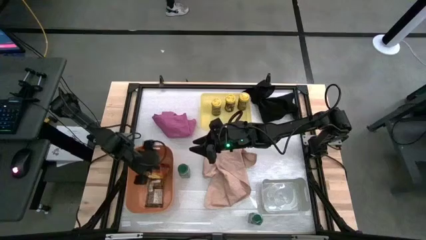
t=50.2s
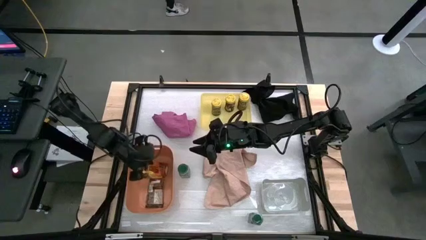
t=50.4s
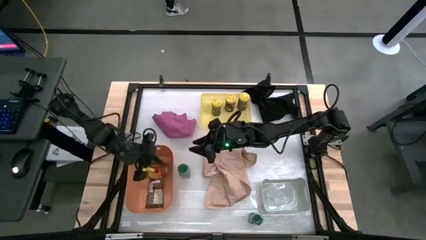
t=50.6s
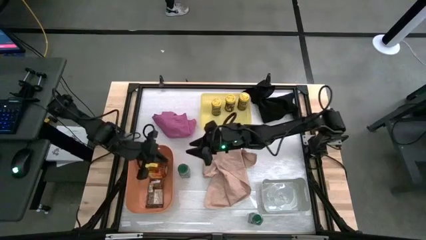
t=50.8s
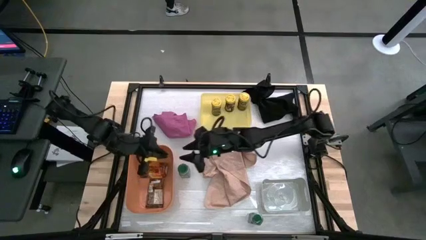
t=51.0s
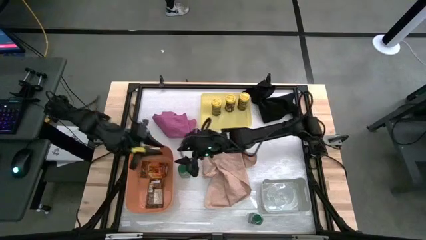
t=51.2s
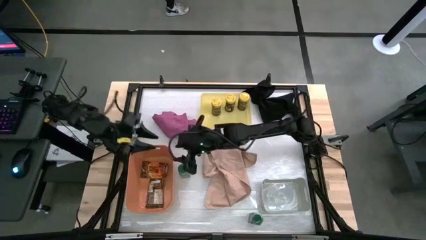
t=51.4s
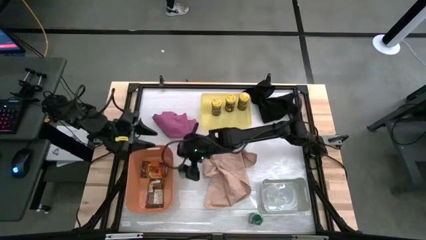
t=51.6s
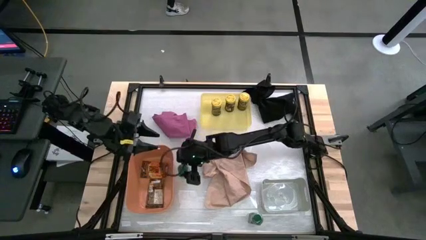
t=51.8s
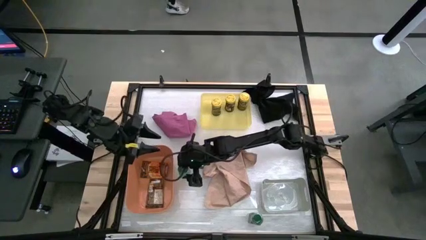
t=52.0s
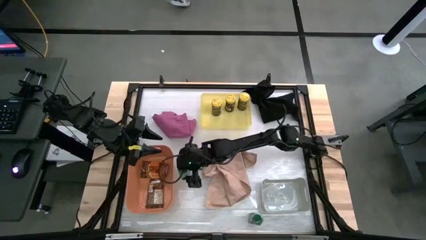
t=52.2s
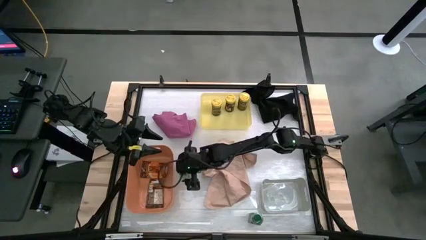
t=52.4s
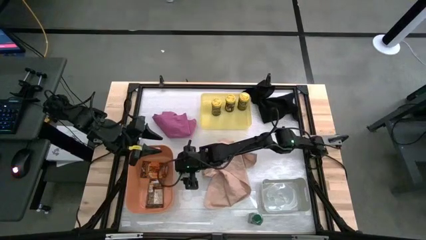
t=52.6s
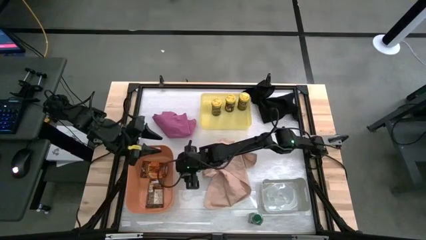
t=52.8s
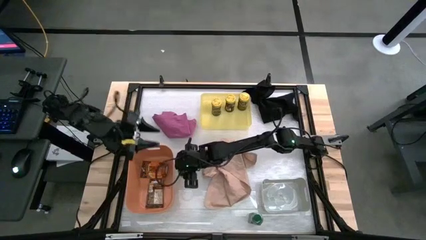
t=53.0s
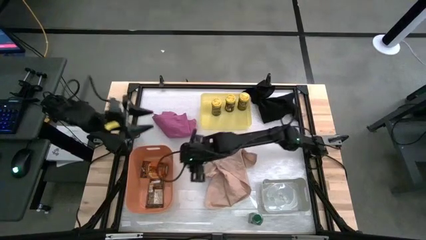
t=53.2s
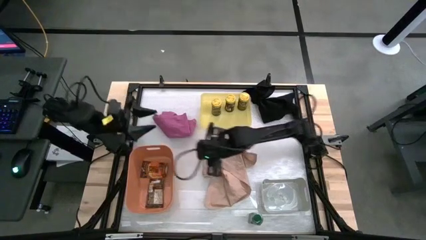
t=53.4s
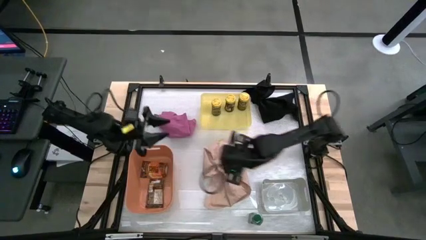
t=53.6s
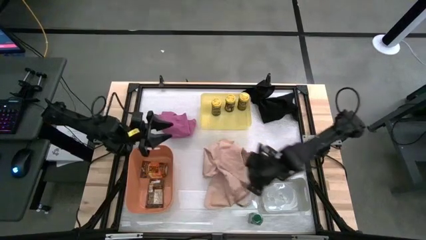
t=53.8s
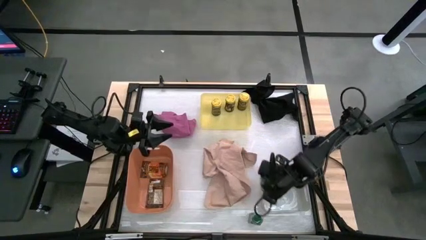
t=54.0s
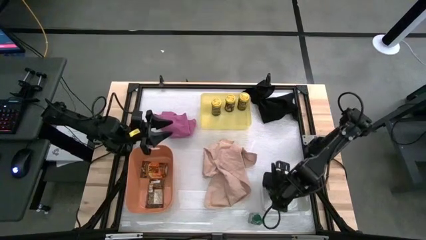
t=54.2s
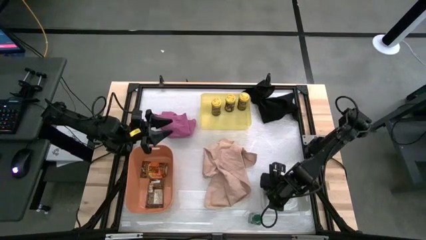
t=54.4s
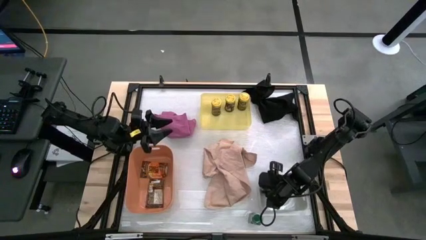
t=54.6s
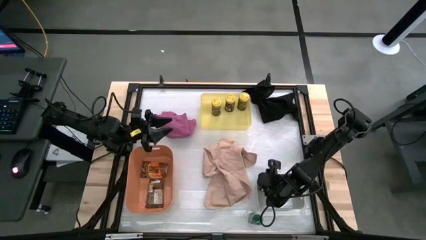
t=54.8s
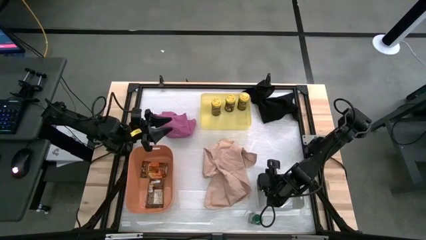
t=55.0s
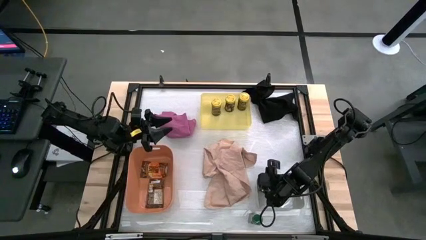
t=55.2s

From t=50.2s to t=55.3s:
Task: Sort spices by type
Put the top green spice bottle into the gray bin

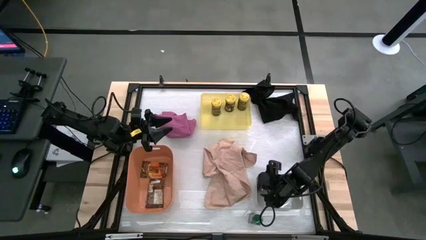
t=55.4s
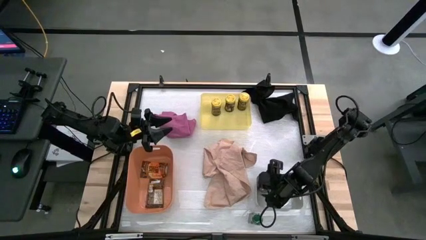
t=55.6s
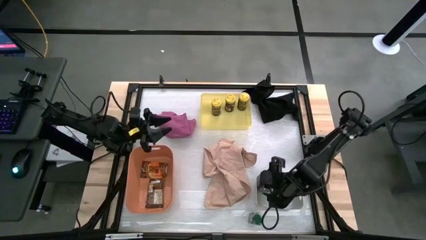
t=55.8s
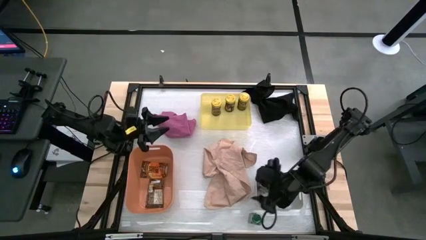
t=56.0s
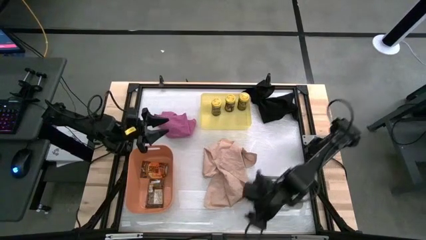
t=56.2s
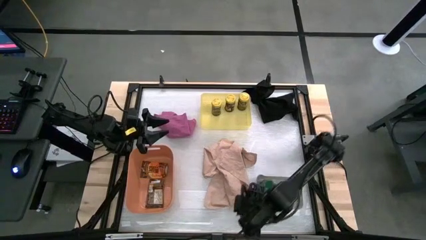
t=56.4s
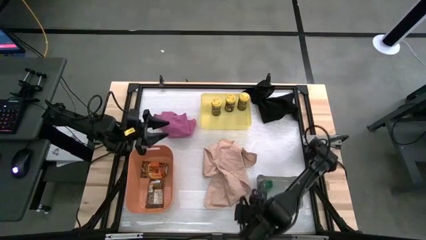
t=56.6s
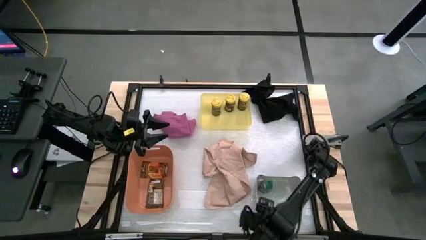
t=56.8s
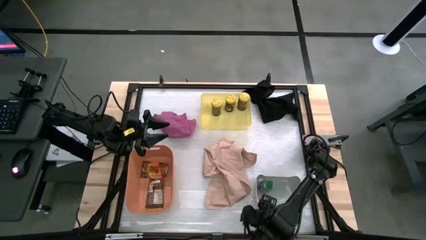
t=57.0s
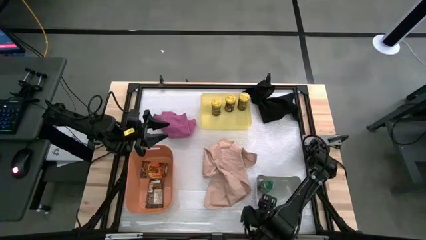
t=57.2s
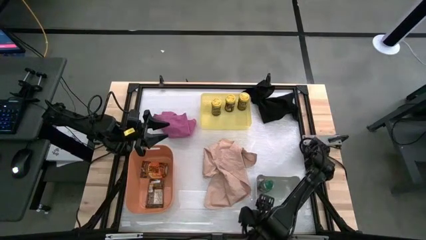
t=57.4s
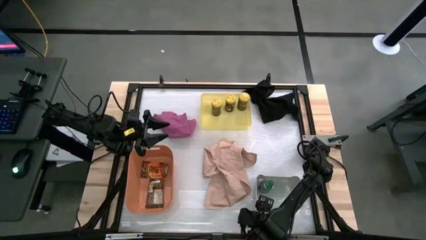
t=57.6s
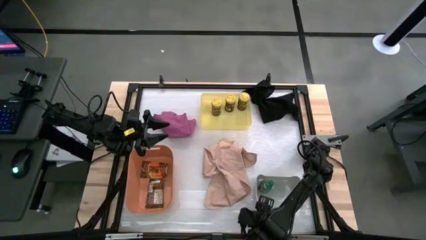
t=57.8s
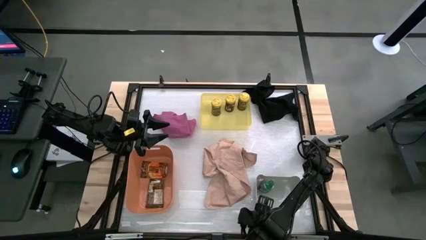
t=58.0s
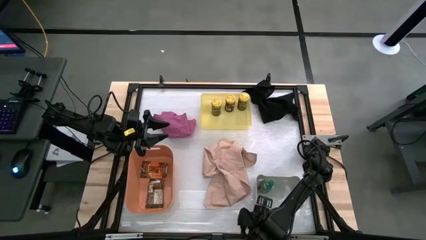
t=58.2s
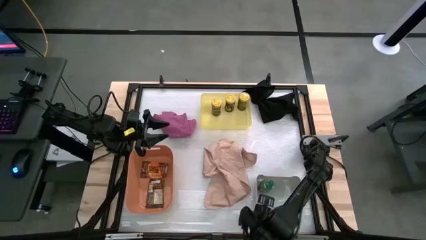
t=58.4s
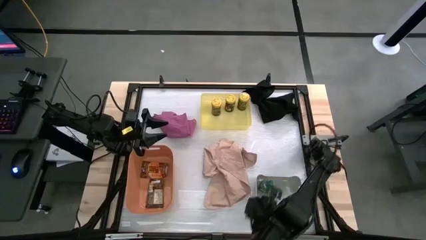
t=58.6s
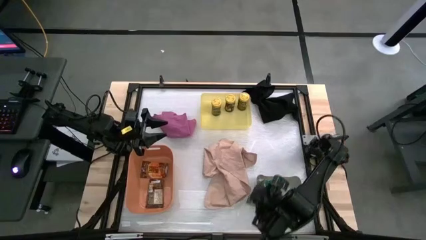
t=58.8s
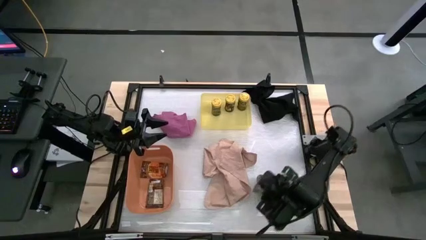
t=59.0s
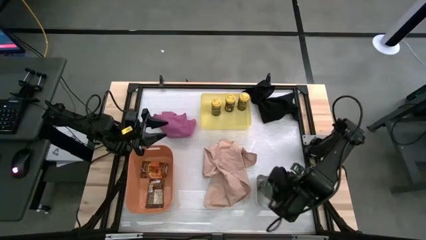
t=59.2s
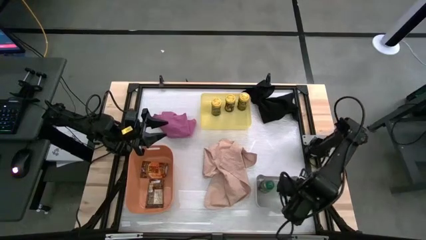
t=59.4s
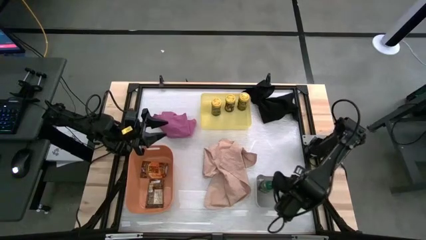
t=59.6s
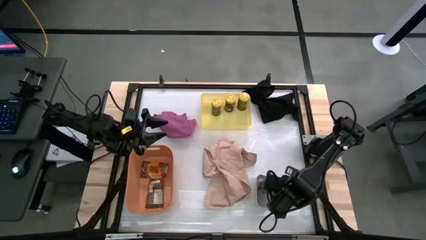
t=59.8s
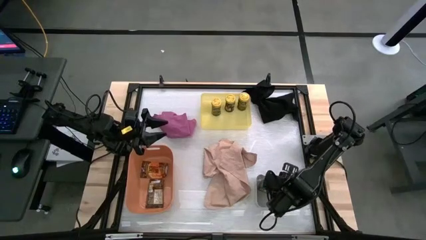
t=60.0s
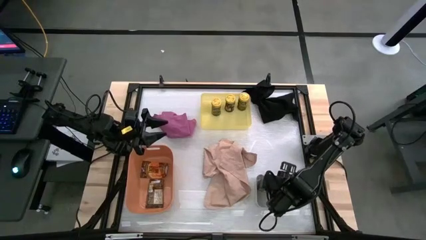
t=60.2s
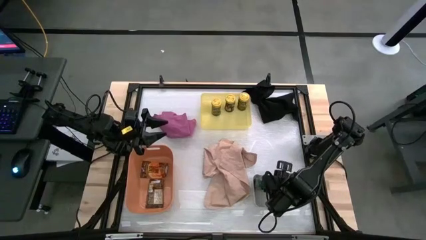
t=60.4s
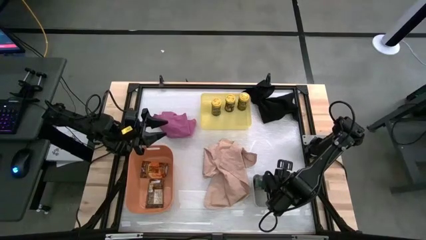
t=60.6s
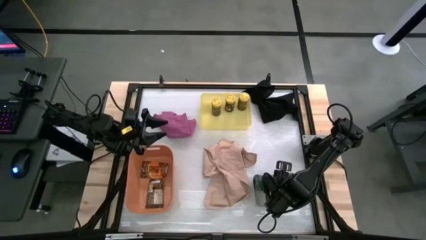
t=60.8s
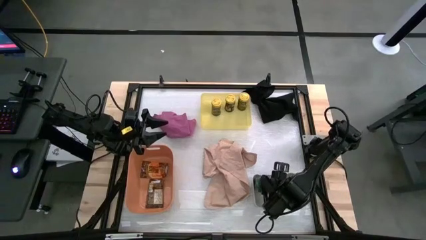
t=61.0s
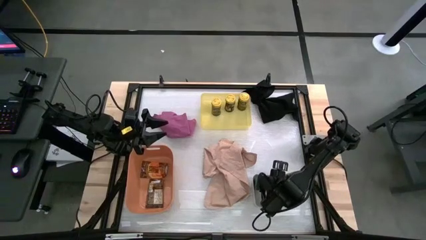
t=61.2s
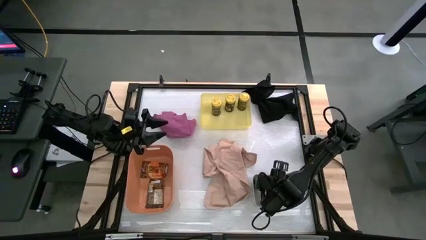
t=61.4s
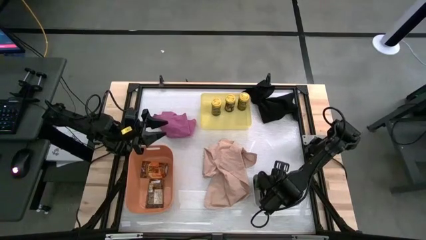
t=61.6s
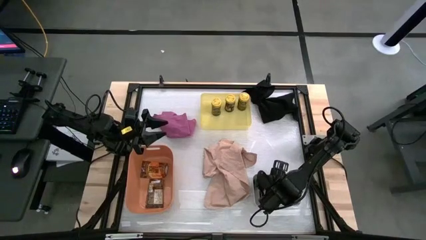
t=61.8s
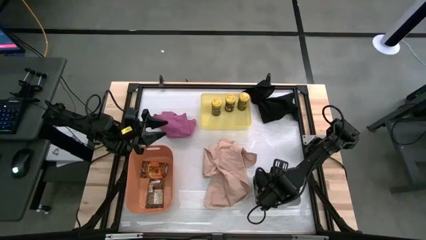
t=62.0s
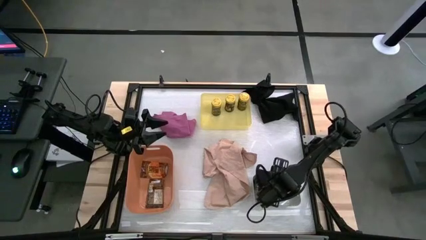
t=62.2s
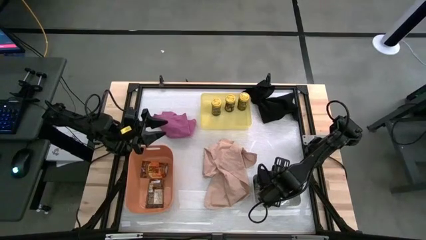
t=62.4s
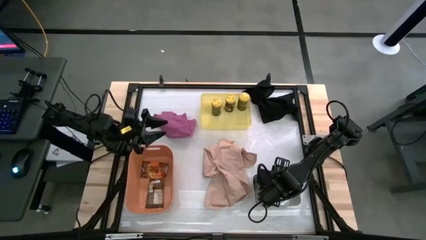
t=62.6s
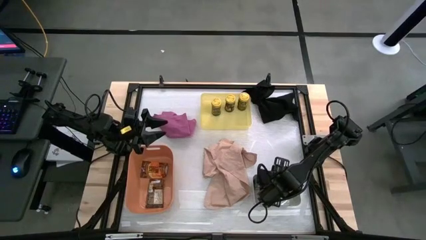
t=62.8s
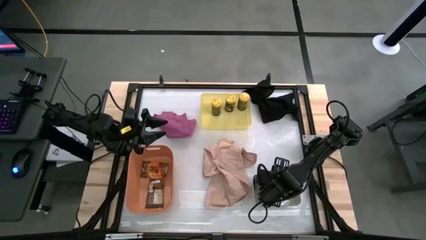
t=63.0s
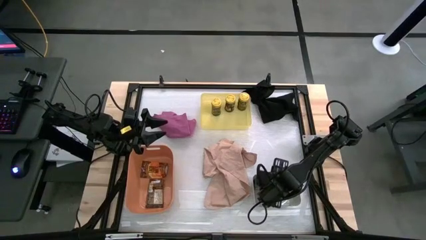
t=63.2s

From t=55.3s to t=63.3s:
Put the green spice bottle into the gray bin

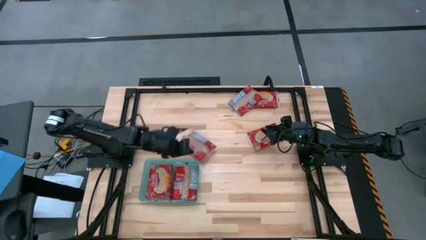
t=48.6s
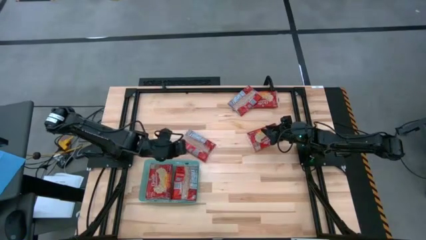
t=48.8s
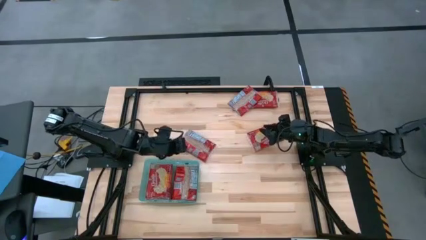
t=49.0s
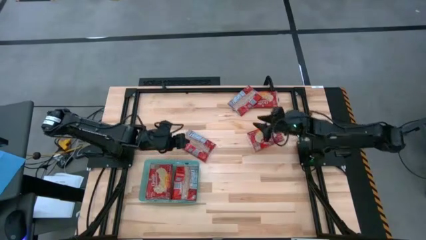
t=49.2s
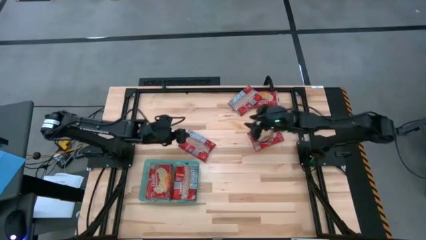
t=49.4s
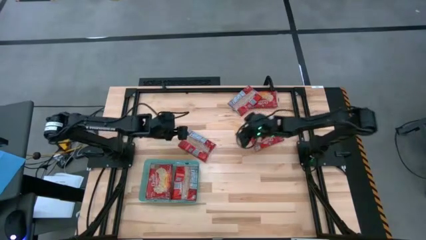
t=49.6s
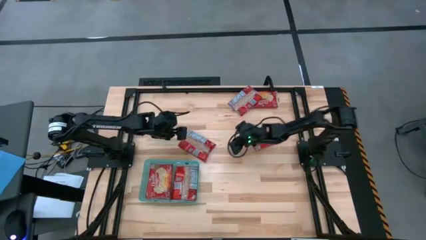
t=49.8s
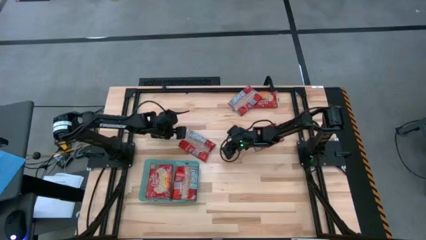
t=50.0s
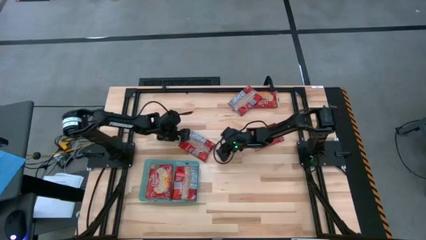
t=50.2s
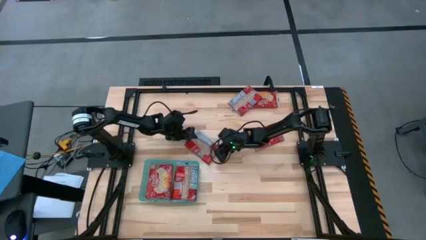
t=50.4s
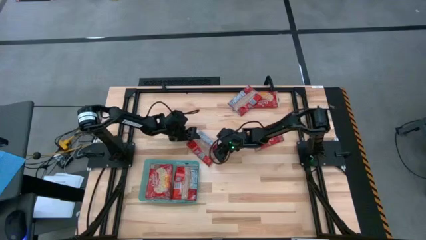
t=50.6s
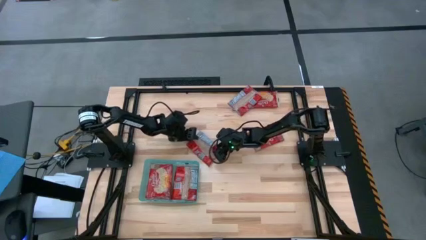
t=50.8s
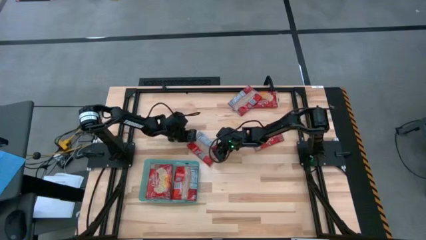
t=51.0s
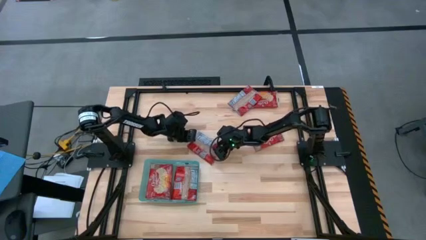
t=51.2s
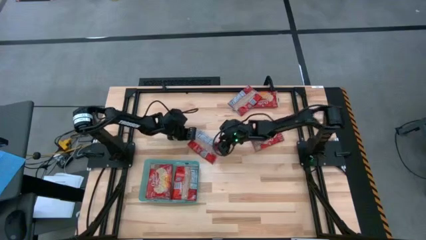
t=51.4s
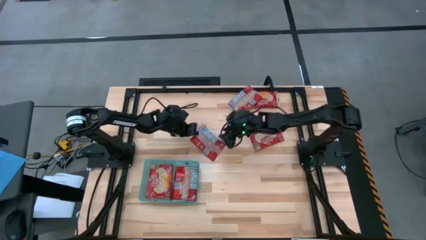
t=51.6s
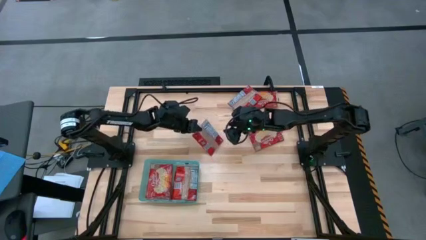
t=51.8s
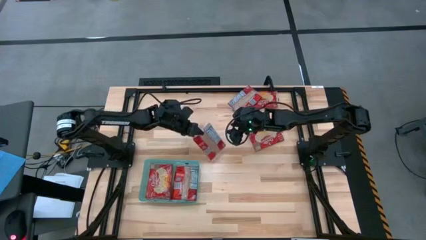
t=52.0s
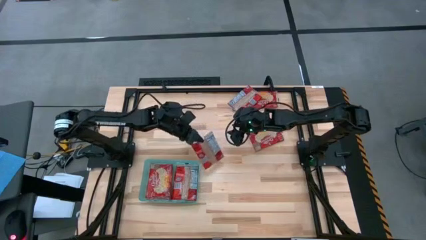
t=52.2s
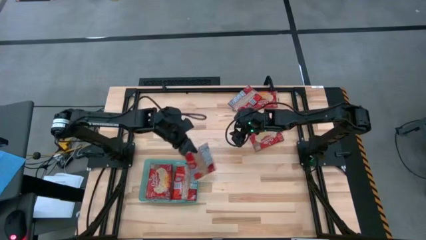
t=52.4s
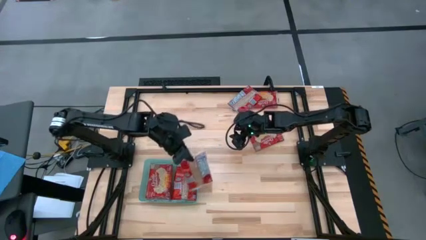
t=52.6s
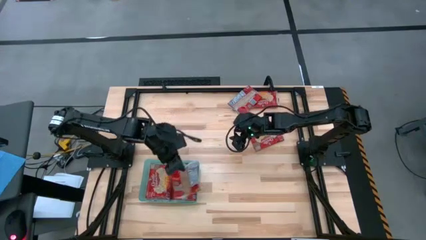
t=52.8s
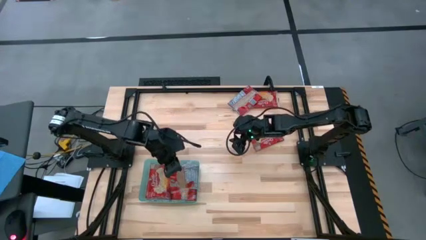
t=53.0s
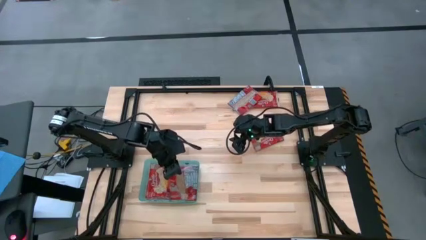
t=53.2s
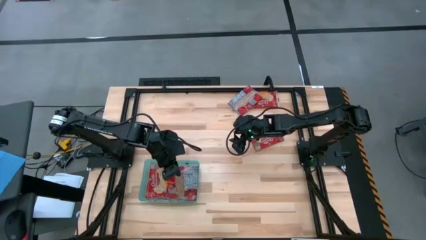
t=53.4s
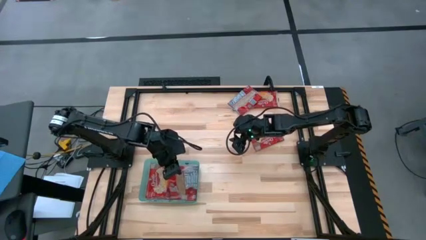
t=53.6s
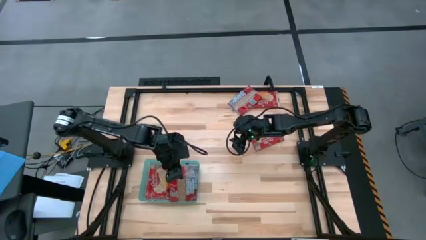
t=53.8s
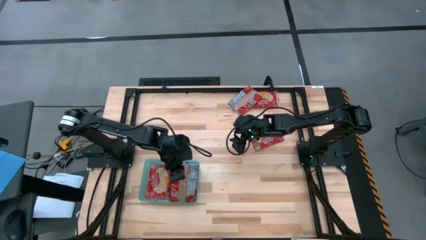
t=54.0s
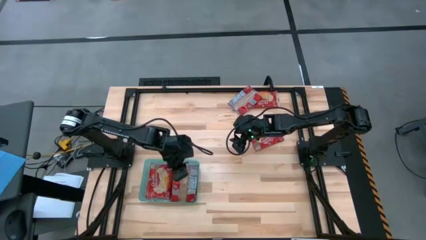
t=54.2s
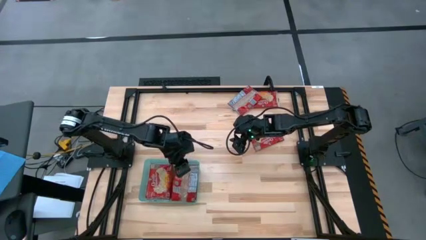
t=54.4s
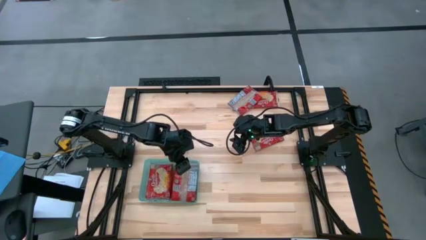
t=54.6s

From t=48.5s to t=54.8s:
Task: Sort popcorn bags into baskets
Put the red popcorn pack into the green bin
